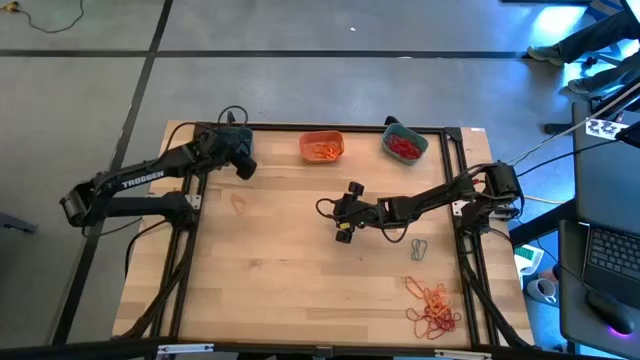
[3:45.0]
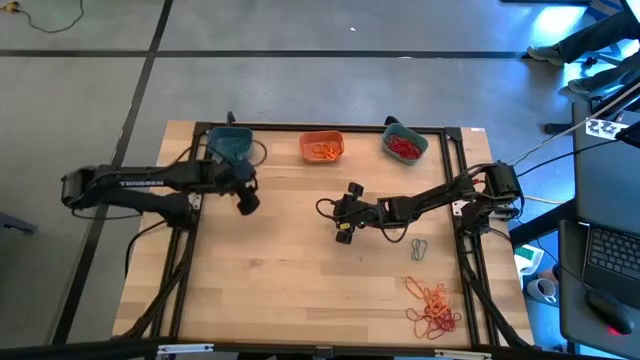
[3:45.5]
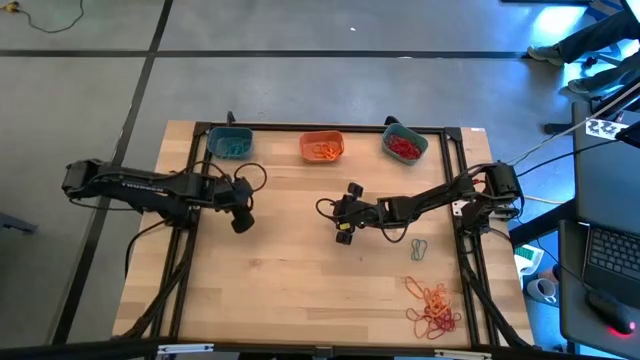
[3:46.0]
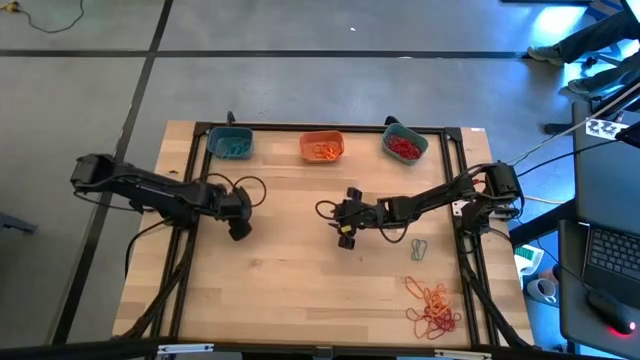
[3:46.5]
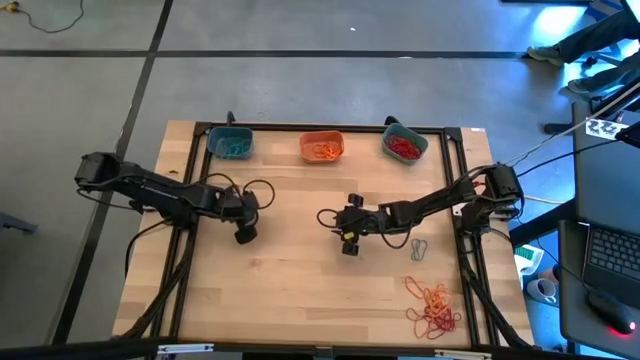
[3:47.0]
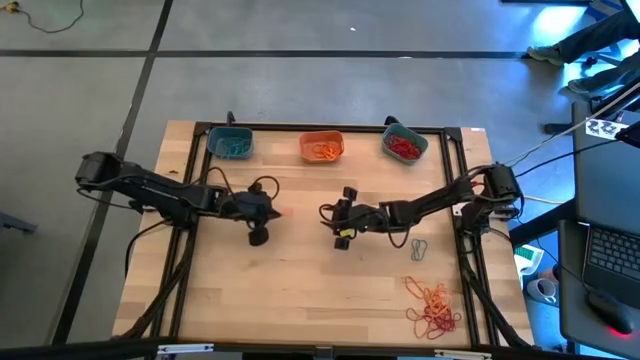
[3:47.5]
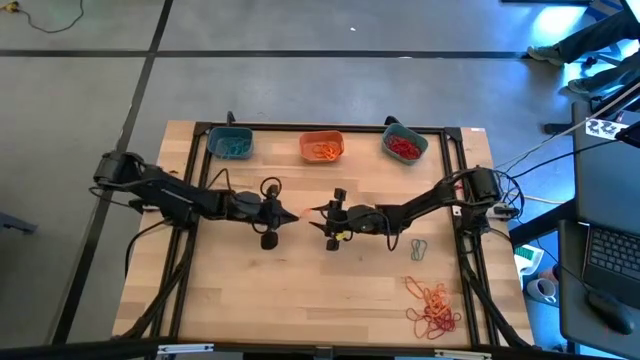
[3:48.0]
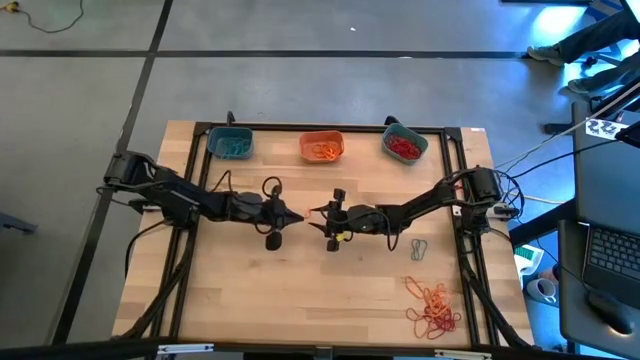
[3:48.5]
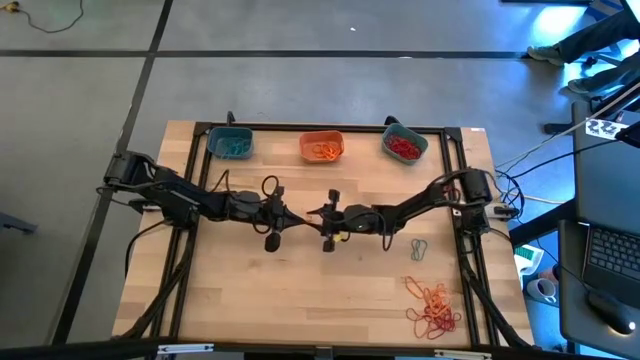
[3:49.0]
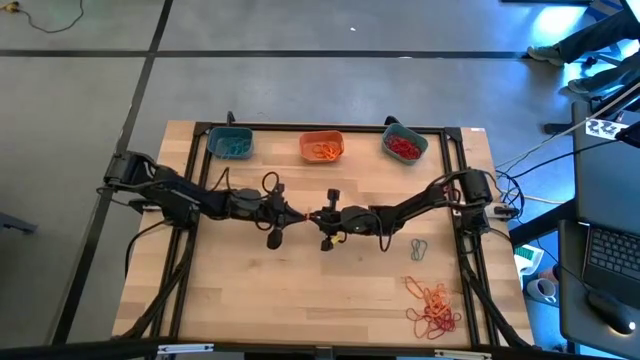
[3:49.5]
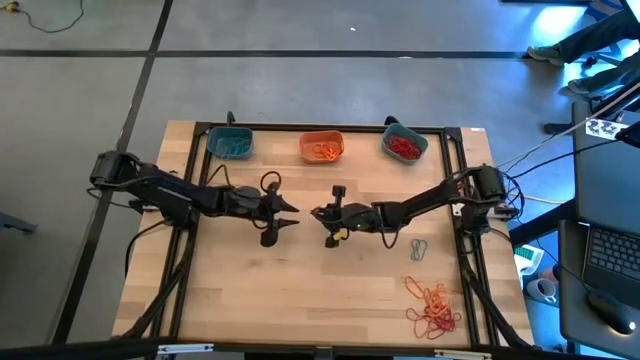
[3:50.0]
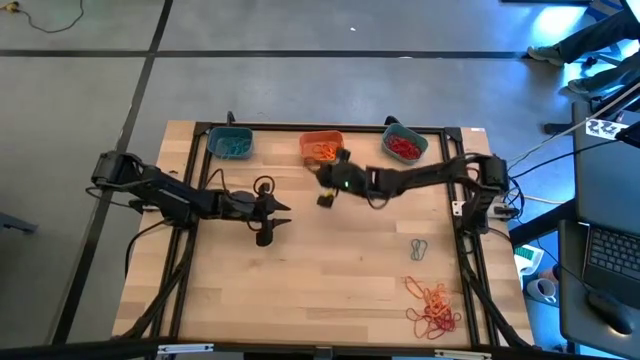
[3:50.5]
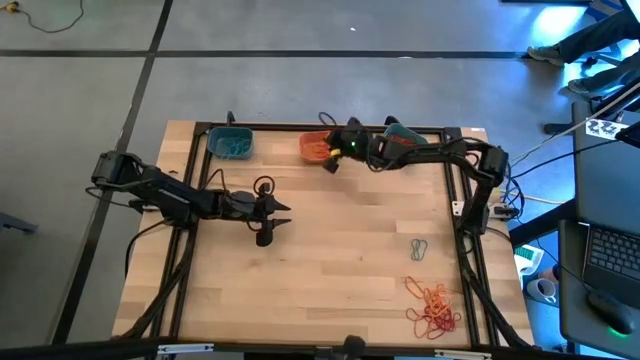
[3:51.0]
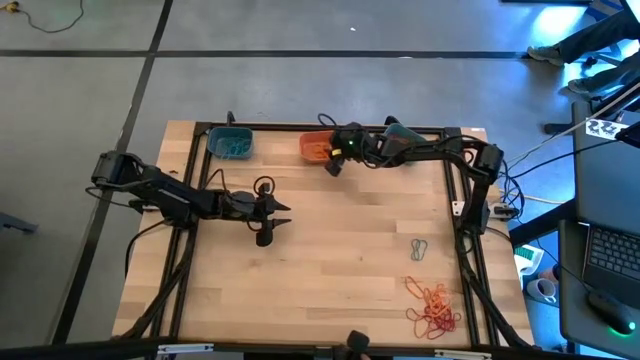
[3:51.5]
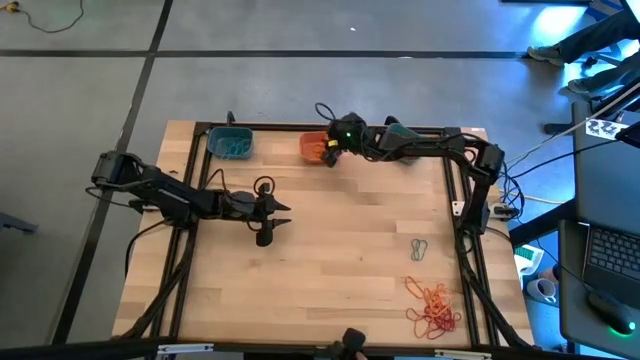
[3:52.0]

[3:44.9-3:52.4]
Task: Sort rubber bands into baskets
Put the orange rubber band into the orange bin

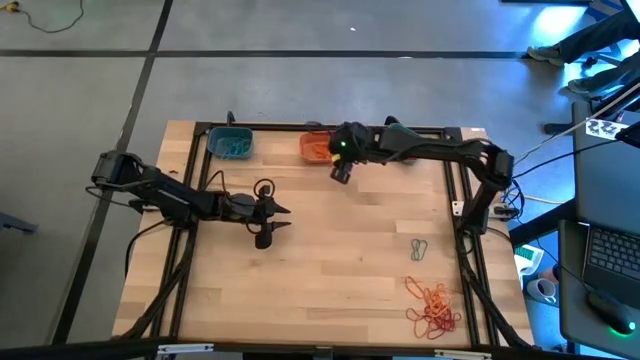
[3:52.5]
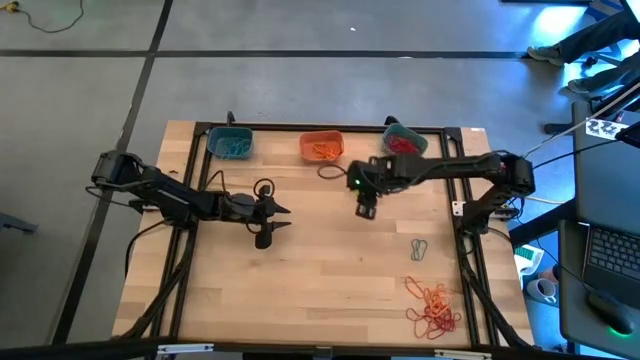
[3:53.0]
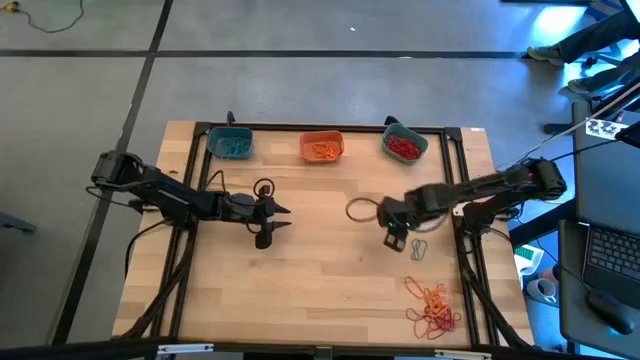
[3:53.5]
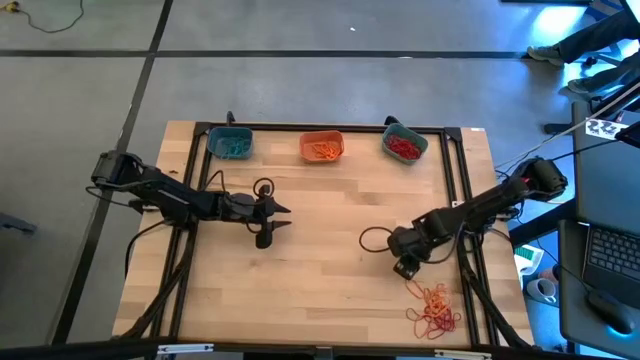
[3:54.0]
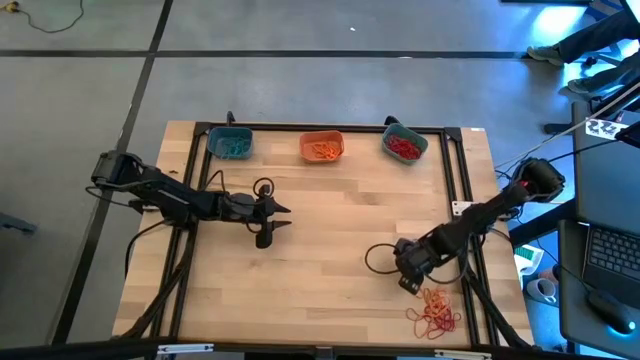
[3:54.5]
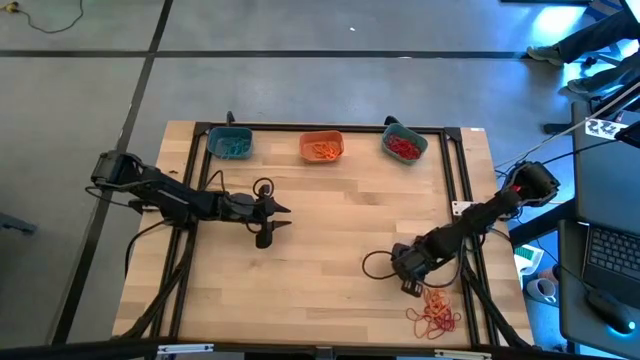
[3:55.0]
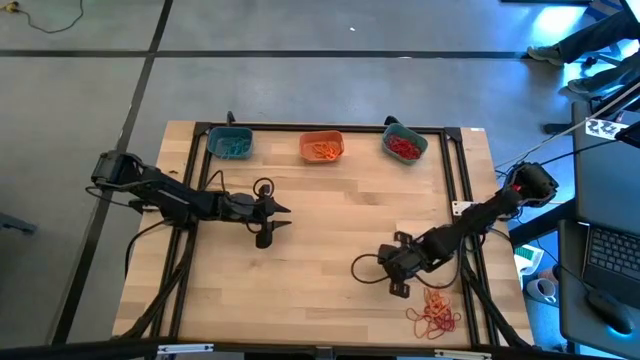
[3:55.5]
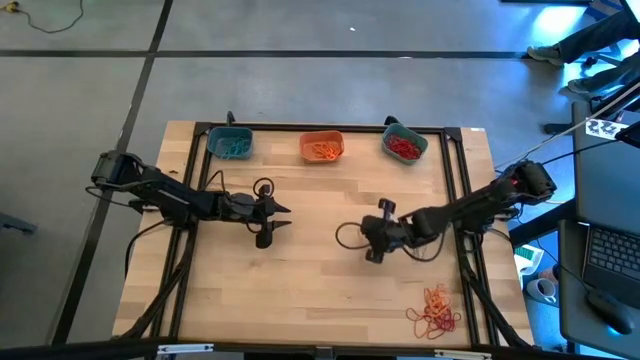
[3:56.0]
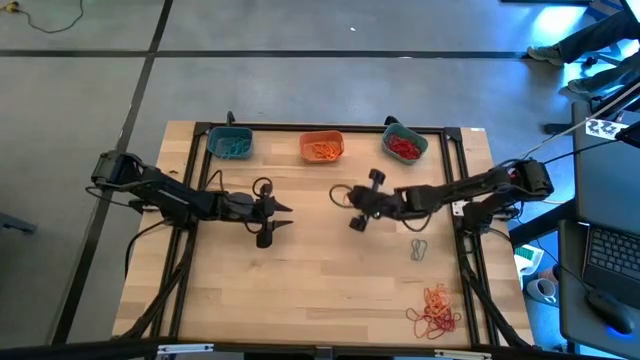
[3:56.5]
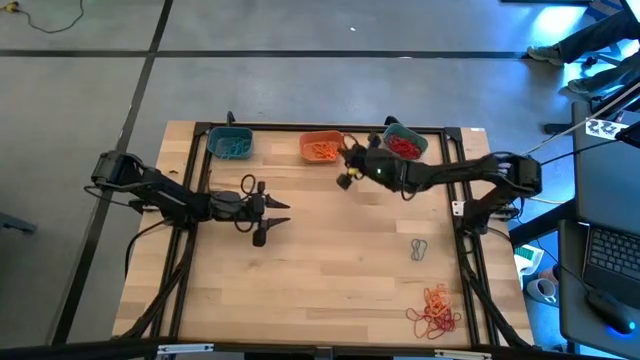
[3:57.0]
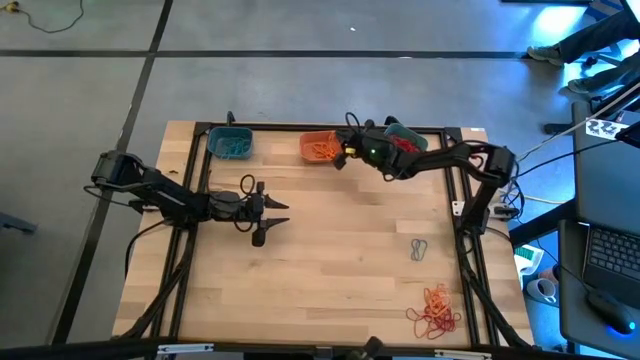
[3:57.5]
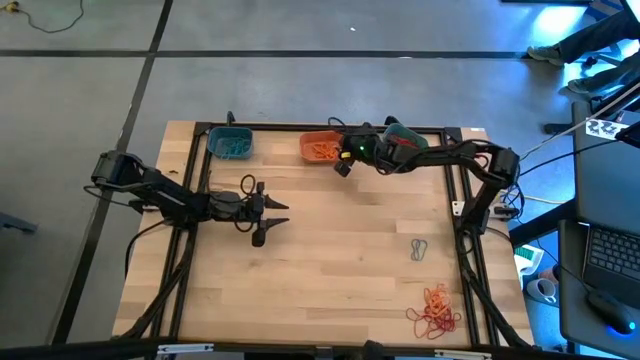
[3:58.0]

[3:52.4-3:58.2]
Put the orange rubber band into the orange bin

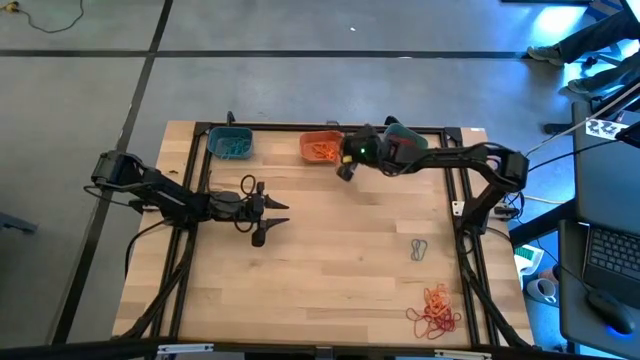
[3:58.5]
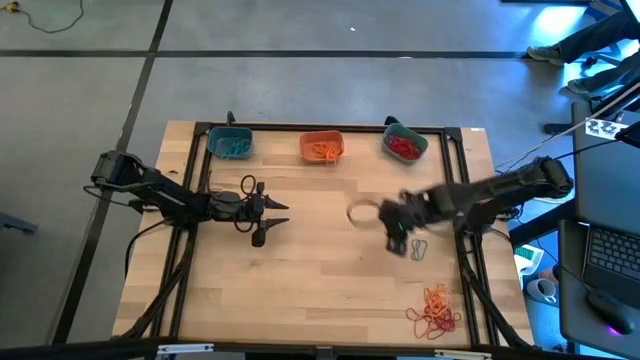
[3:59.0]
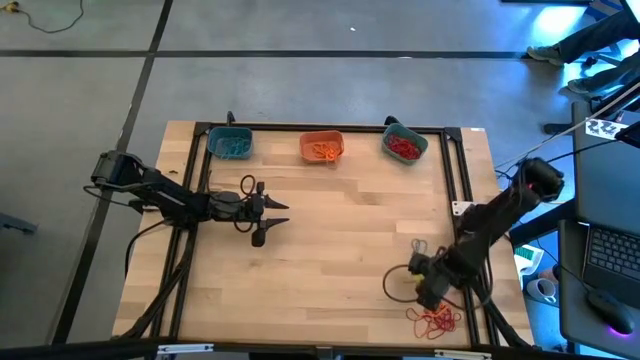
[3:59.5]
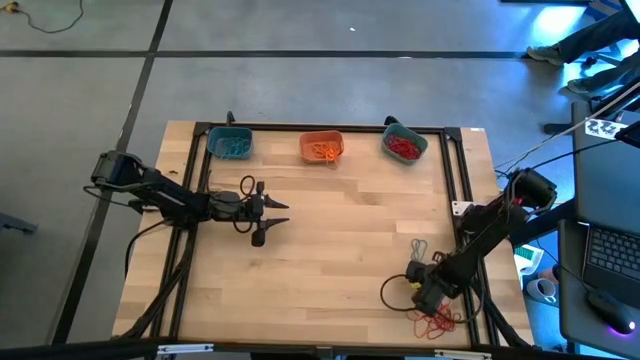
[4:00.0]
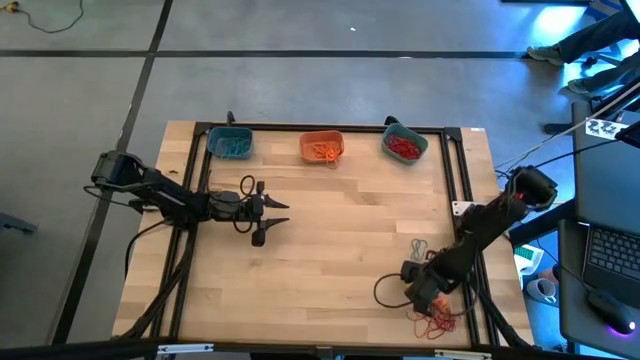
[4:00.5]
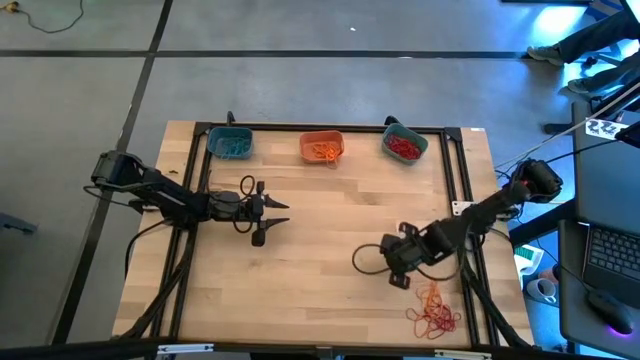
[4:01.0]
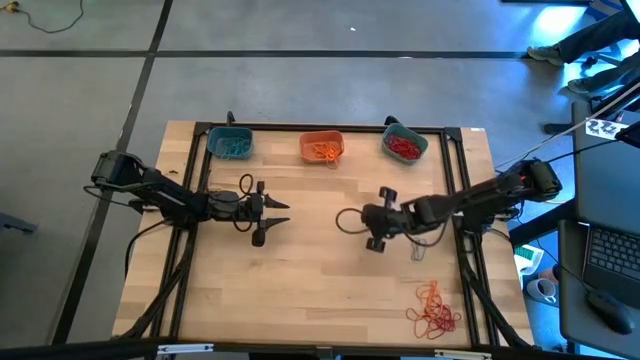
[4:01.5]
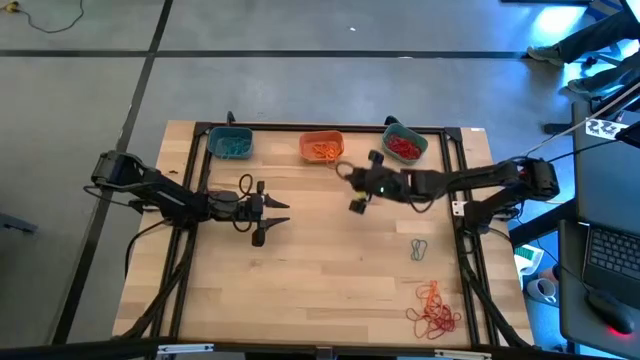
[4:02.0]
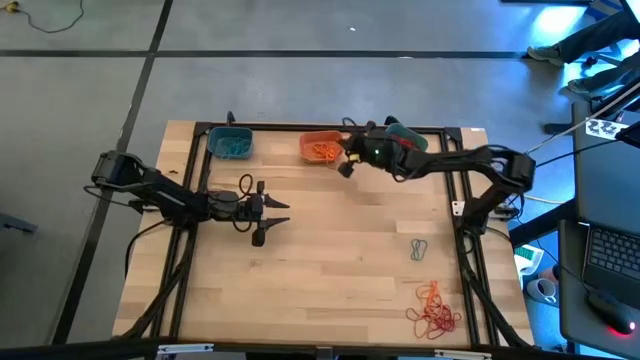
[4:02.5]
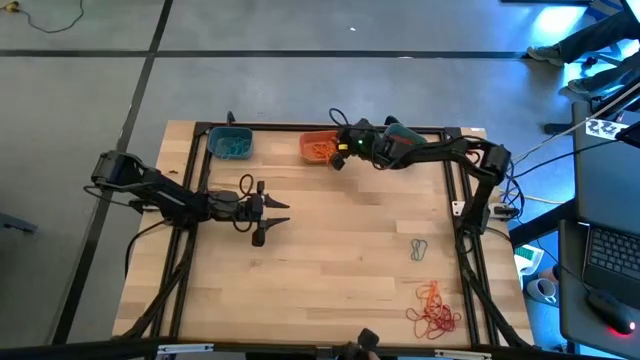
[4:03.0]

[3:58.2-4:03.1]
Put the orange rubber band into the orange bin

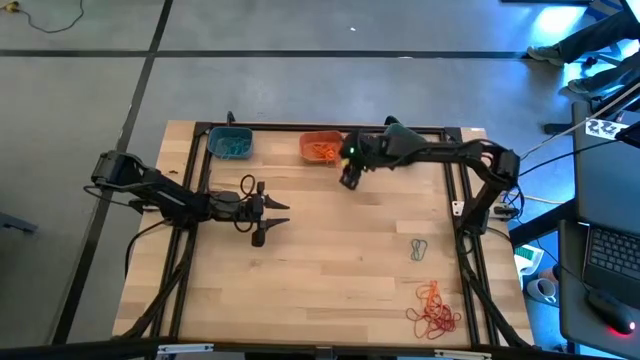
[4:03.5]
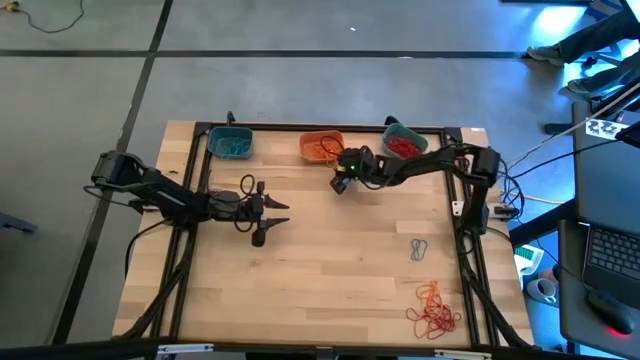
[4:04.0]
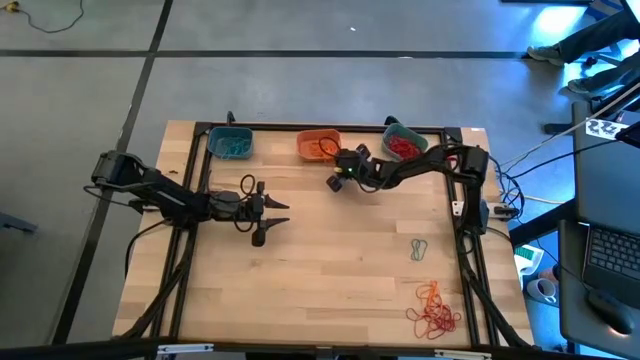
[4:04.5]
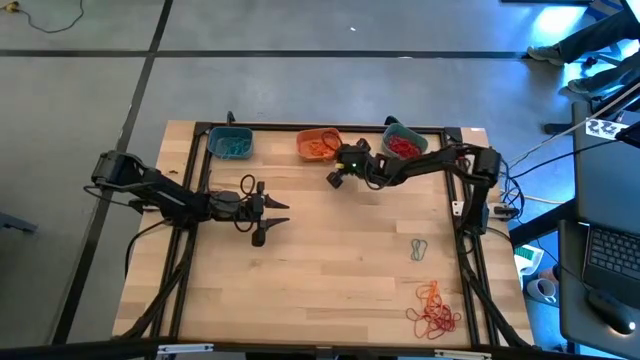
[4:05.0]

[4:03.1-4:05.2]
Put the orange rubber band into the orange bin

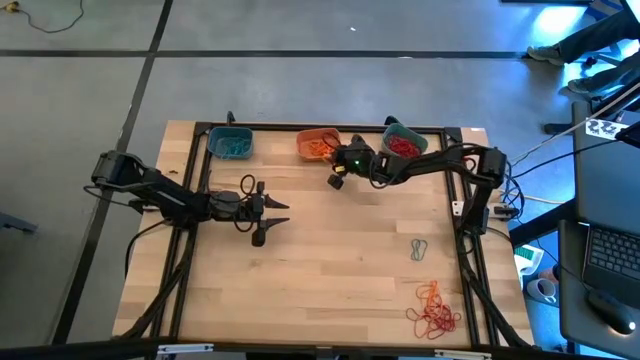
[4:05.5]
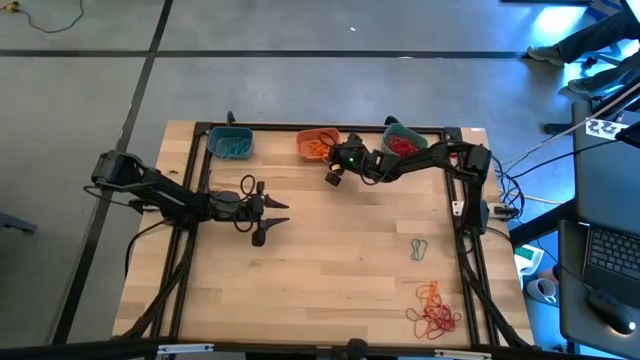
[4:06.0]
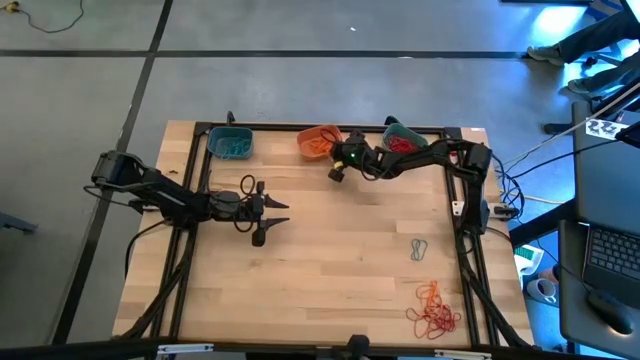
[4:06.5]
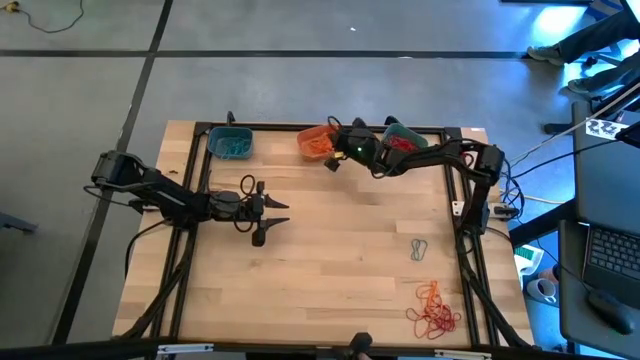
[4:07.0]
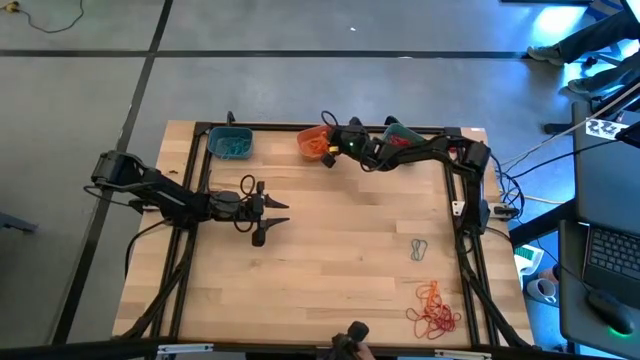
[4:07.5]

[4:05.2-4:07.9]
Put the orange rubber band into the orange bin
